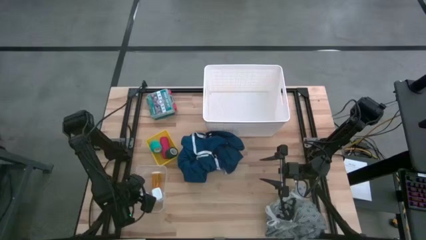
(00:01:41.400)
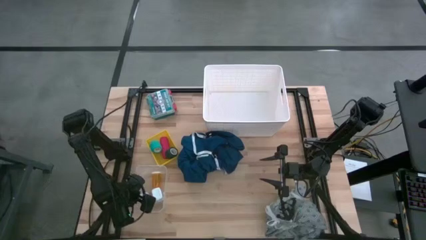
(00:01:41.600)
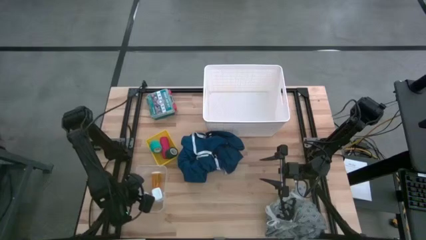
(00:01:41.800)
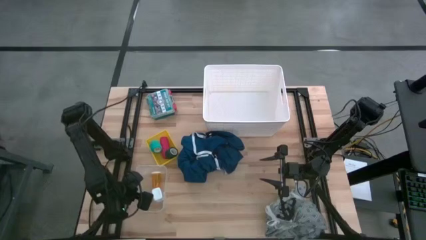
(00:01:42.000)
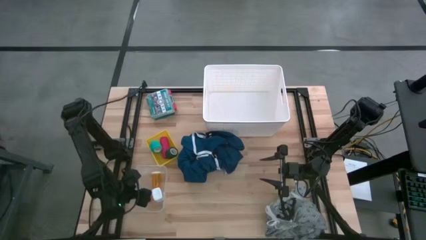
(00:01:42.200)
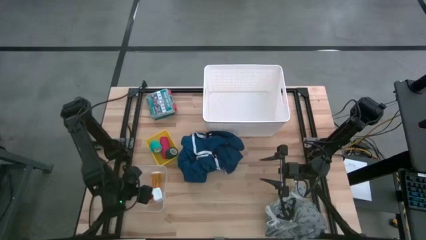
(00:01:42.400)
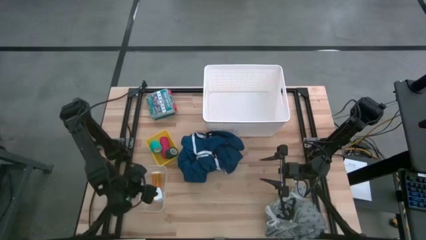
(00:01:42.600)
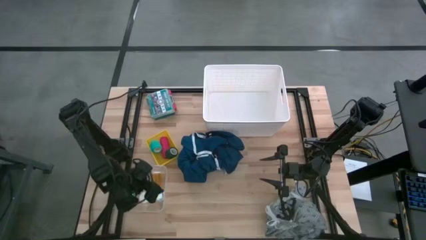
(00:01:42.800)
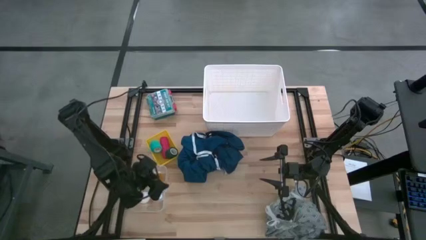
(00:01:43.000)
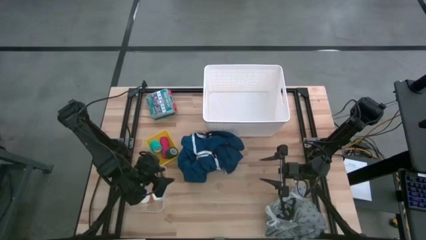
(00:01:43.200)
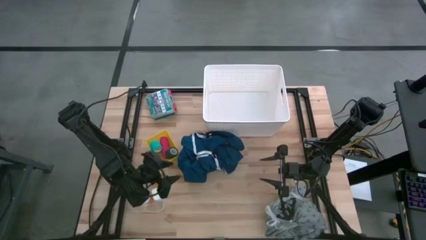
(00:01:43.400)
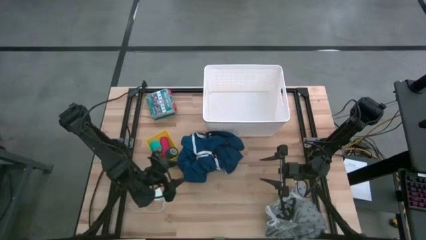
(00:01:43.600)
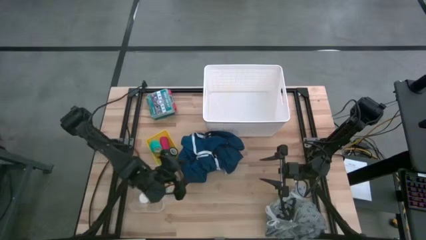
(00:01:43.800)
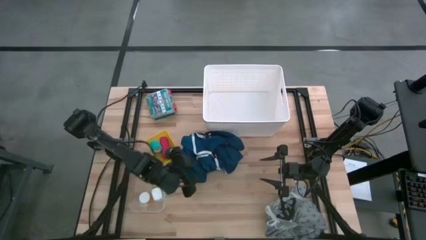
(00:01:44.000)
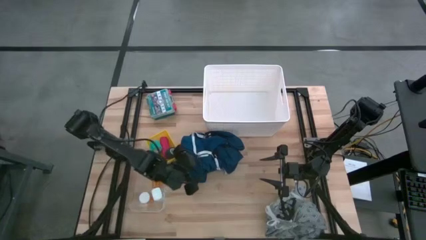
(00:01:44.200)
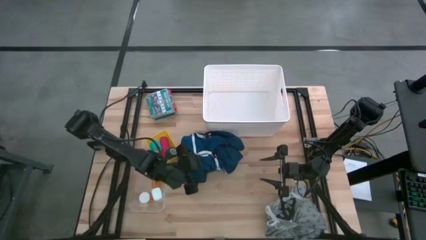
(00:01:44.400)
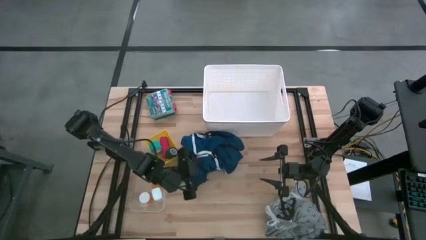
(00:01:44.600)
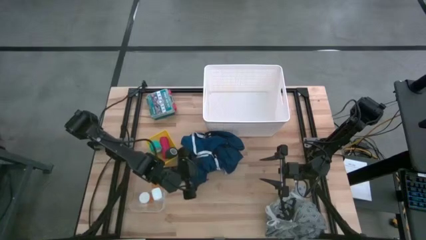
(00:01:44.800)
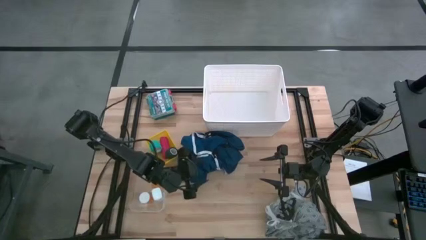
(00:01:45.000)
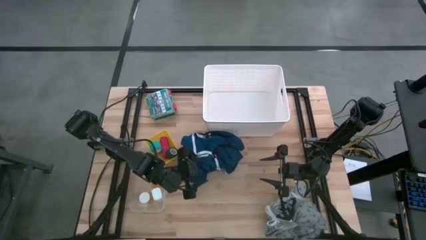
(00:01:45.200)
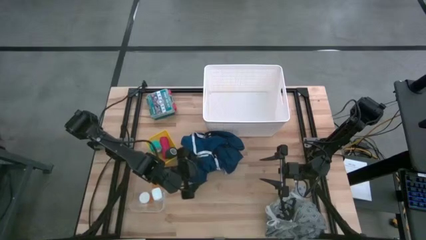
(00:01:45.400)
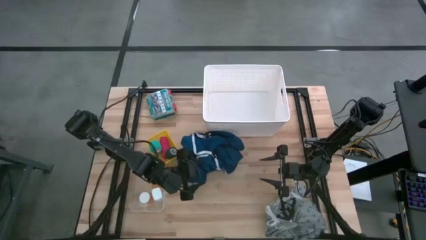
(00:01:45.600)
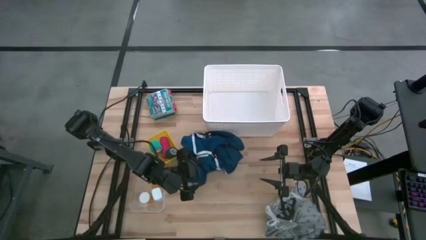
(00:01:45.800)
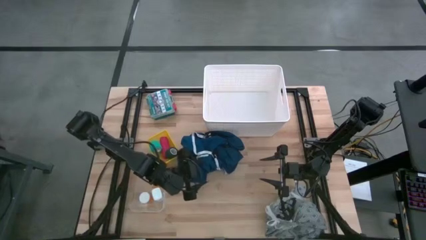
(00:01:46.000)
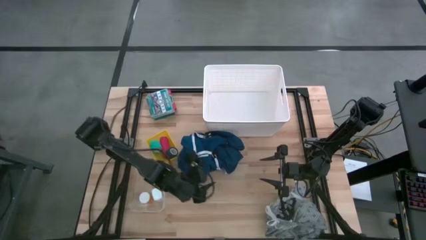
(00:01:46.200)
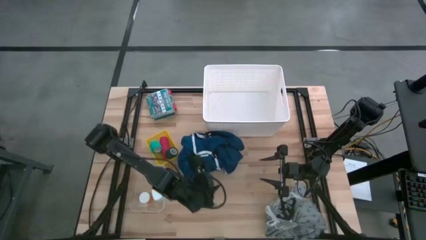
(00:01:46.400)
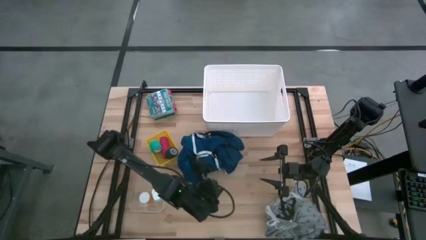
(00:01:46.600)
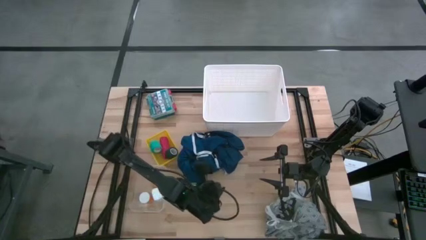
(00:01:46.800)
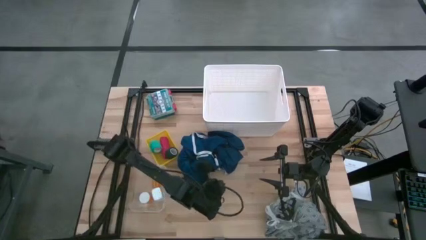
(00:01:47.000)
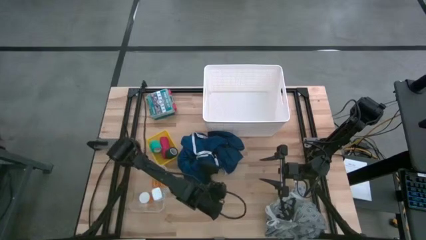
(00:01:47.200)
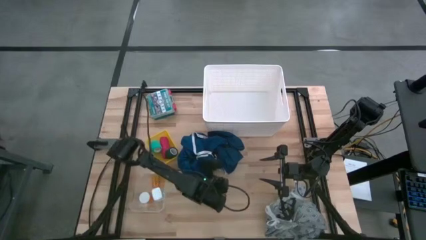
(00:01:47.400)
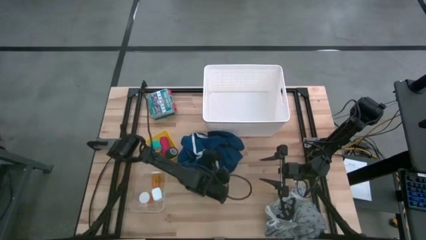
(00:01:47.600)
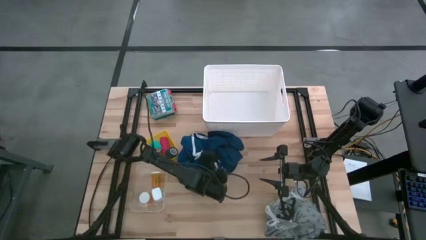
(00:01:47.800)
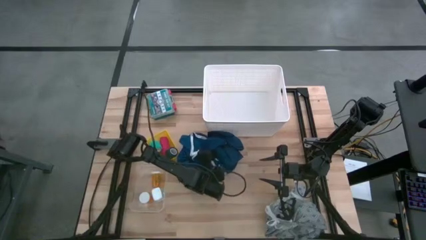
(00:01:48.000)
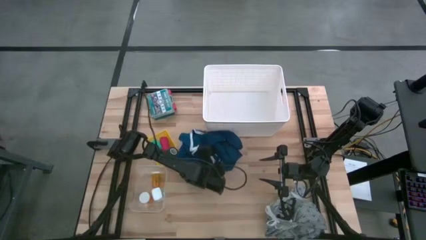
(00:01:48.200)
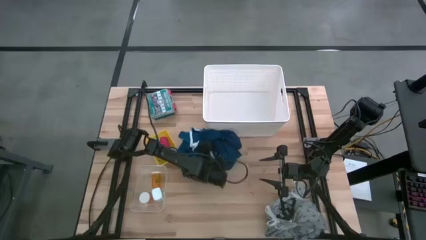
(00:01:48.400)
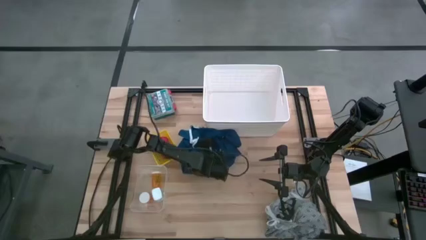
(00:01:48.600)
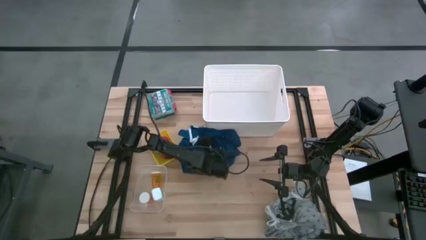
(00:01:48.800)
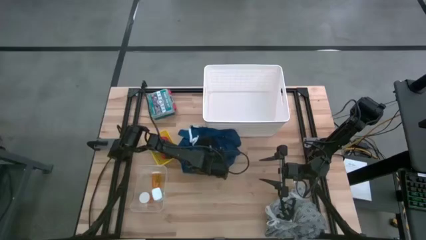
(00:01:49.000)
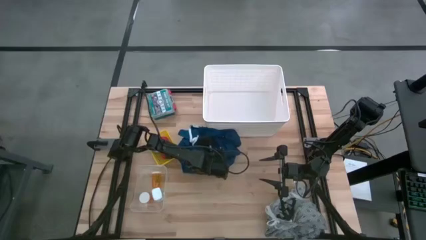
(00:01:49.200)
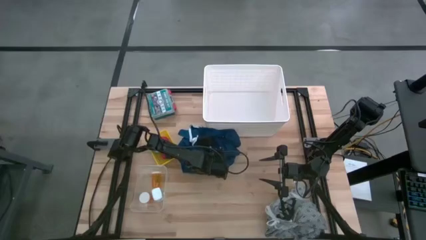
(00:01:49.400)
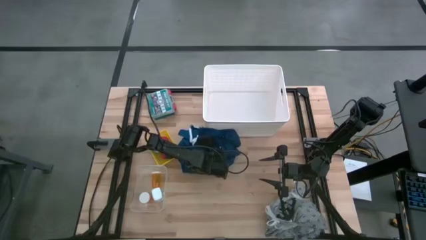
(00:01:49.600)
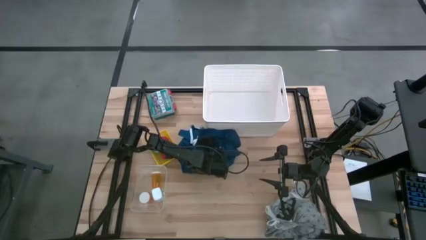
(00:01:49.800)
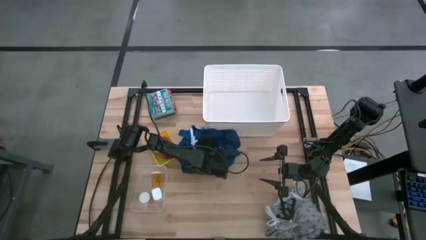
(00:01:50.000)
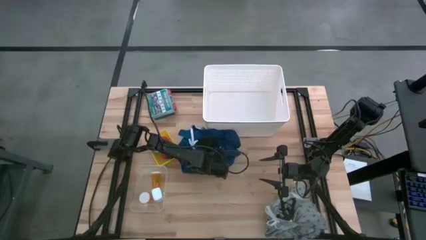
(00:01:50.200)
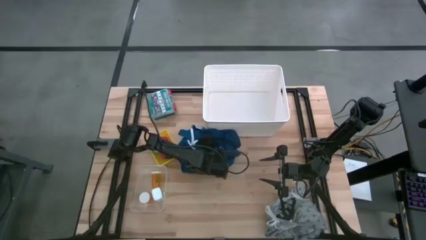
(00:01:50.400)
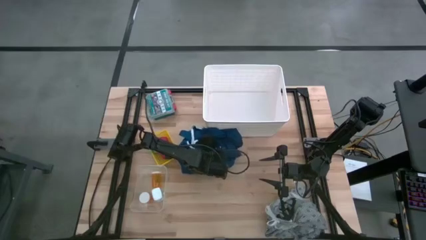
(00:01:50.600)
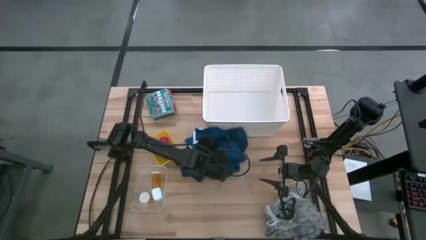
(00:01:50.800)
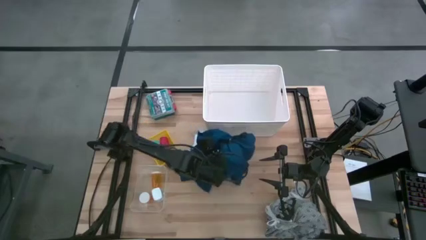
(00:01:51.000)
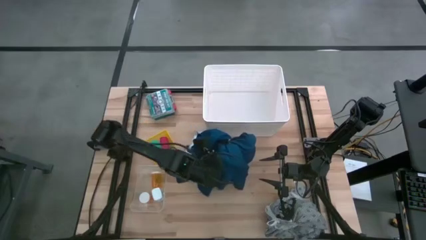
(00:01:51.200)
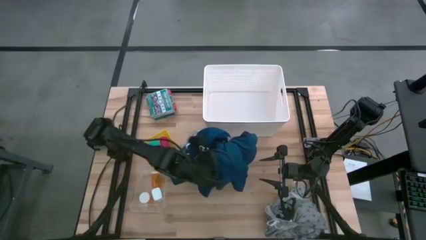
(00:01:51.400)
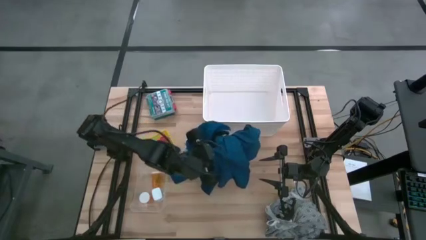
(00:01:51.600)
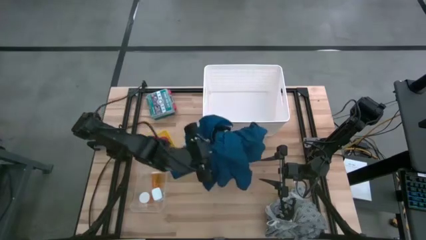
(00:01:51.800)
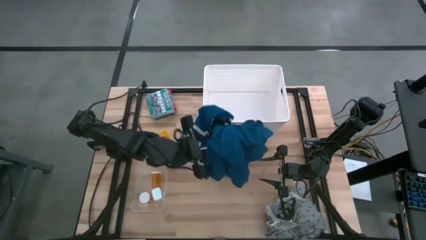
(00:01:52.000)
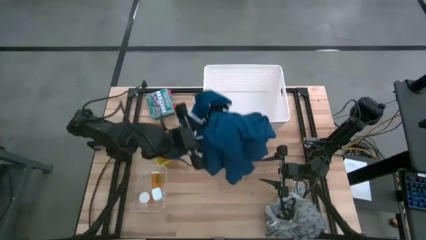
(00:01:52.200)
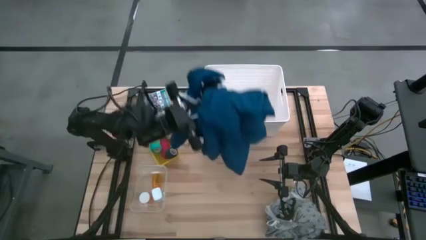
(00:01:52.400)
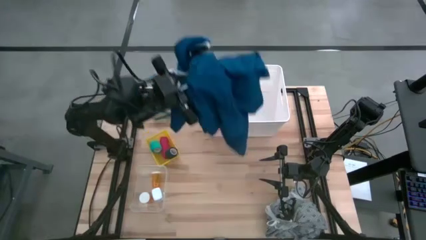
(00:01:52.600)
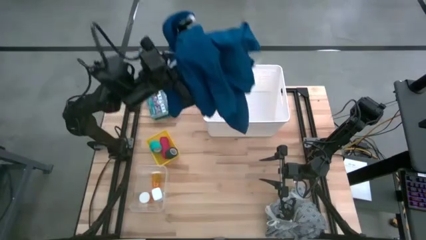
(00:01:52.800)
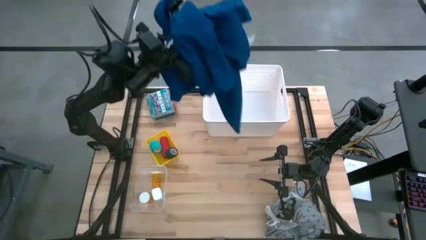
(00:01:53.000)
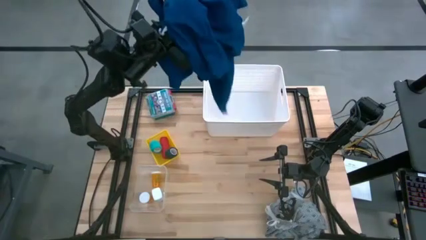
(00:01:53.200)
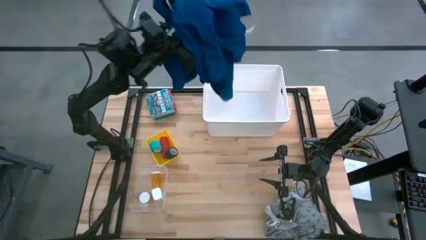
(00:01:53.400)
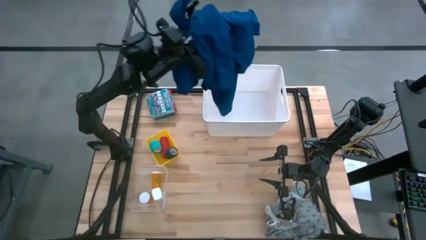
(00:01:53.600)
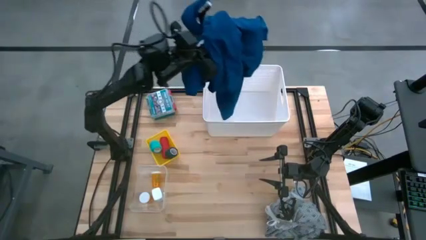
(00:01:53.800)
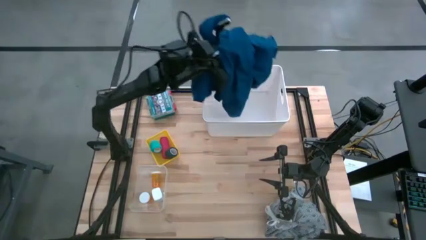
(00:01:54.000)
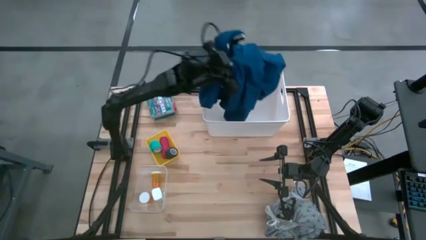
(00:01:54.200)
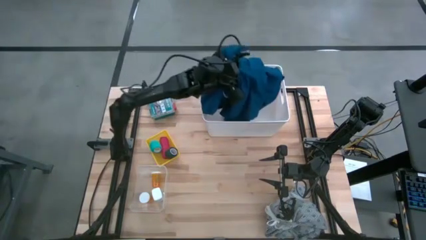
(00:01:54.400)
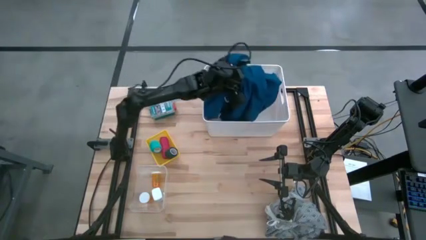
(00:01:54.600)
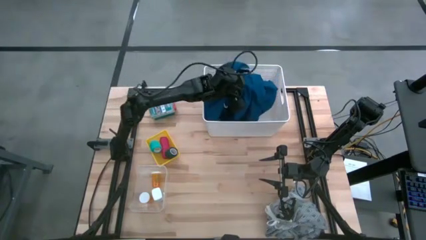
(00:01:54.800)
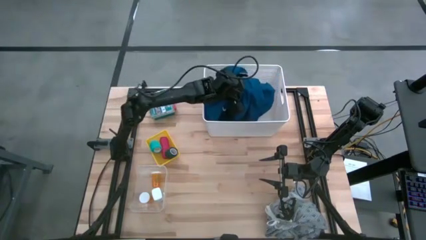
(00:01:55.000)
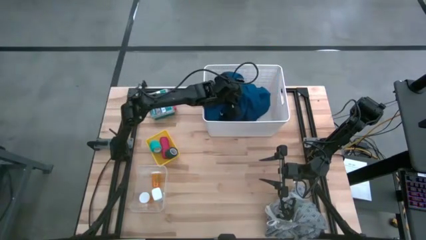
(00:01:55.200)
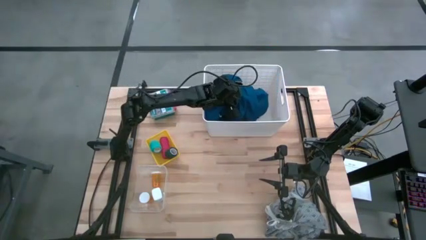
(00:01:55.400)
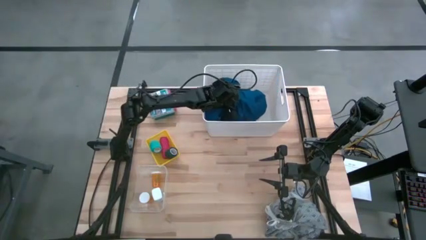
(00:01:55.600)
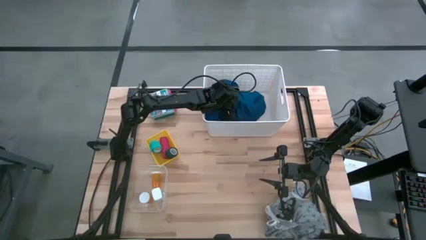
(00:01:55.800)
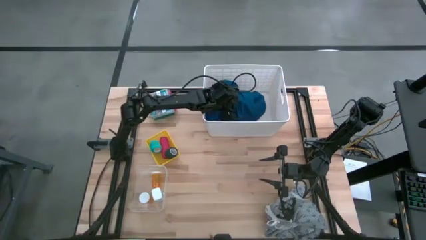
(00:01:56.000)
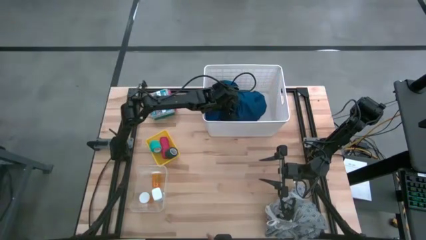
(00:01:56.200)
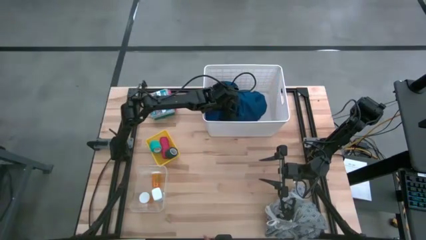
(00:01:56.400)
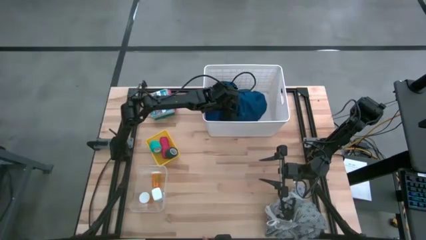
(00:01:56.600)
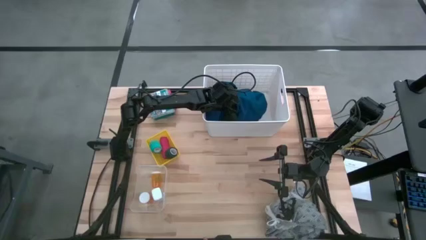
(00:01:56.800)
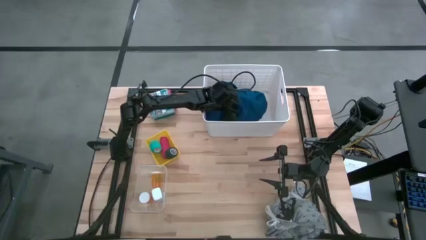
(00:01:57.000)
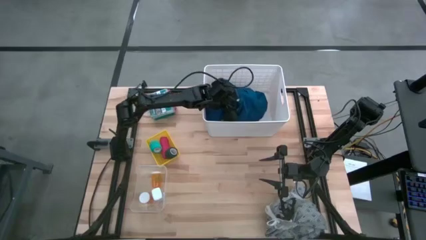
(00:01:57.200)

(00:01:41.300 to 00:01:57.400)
Task: Pick & place medical supplies in basket/bin
Put the dark blue patient gown into the white bin
